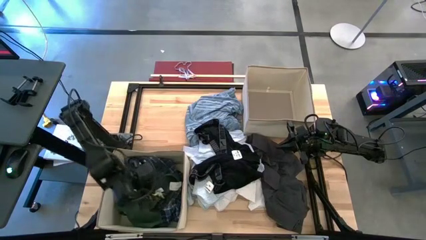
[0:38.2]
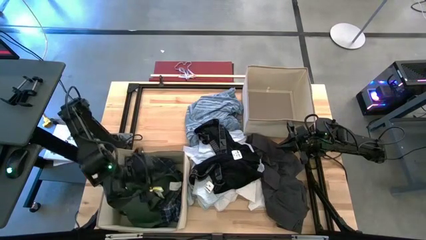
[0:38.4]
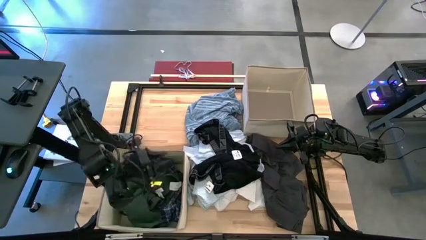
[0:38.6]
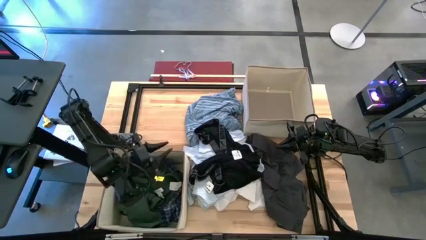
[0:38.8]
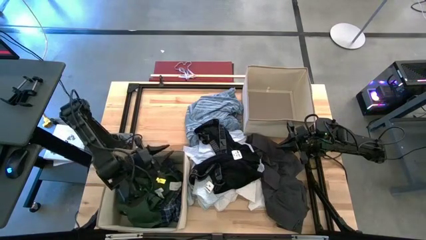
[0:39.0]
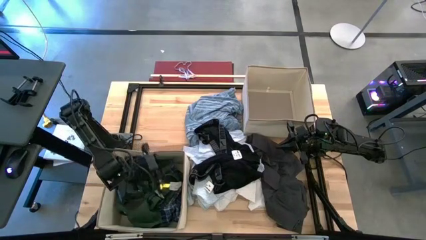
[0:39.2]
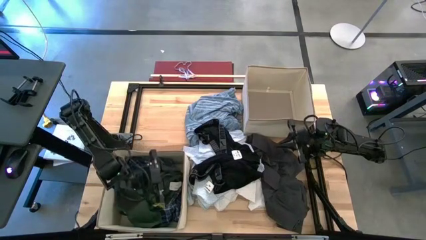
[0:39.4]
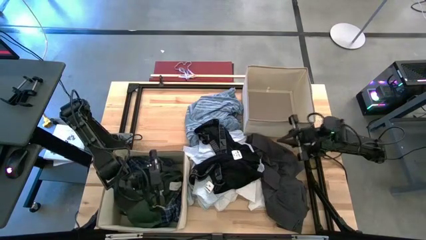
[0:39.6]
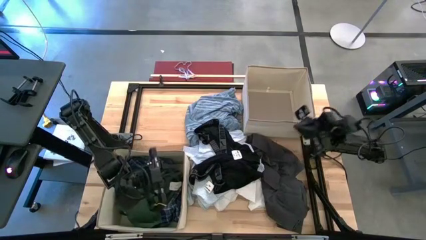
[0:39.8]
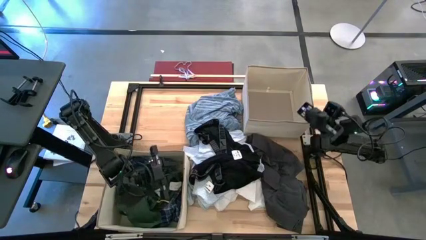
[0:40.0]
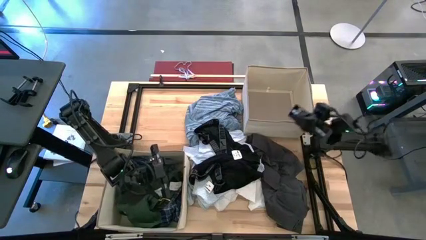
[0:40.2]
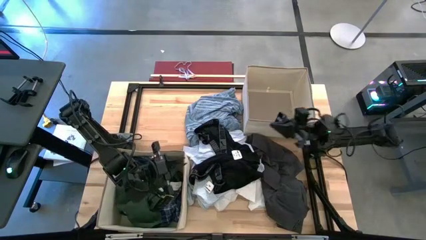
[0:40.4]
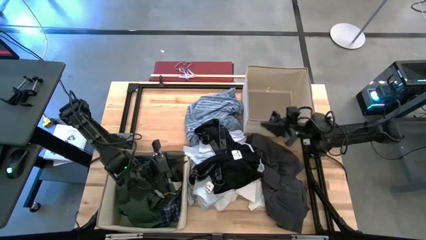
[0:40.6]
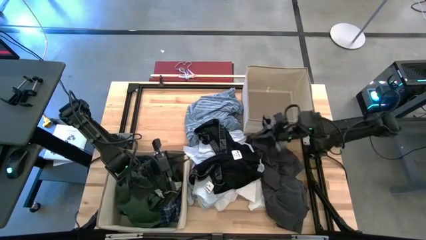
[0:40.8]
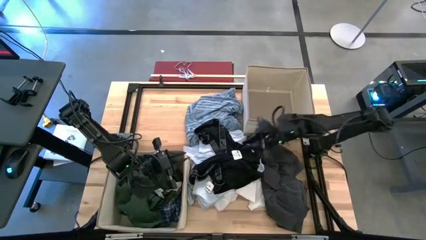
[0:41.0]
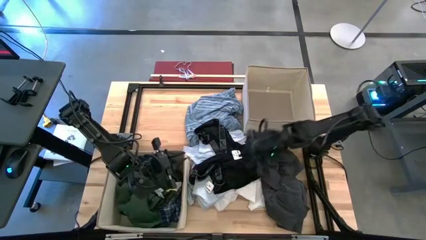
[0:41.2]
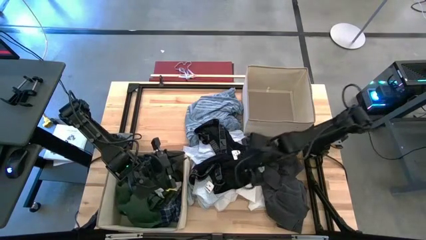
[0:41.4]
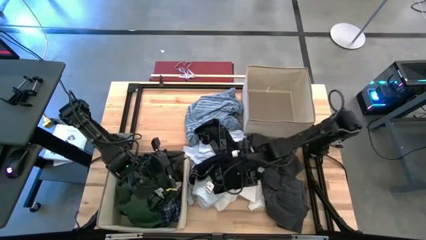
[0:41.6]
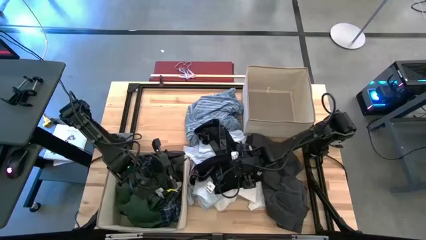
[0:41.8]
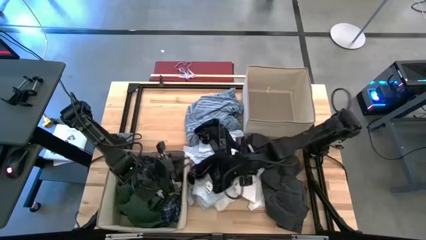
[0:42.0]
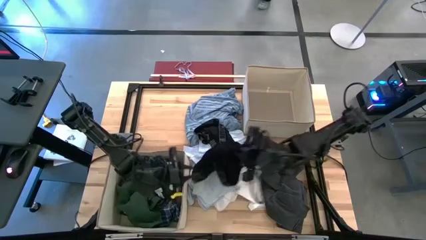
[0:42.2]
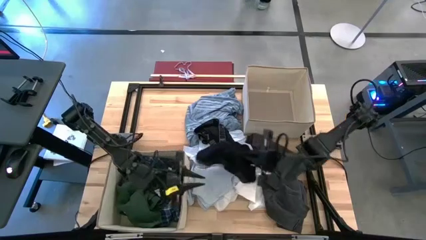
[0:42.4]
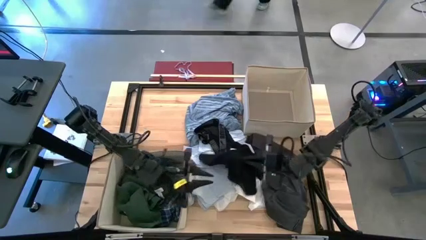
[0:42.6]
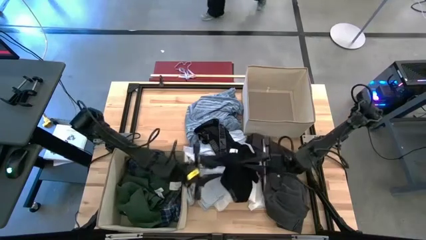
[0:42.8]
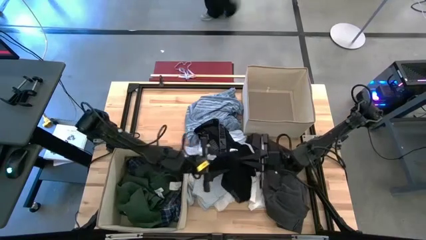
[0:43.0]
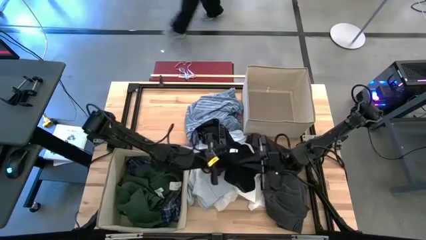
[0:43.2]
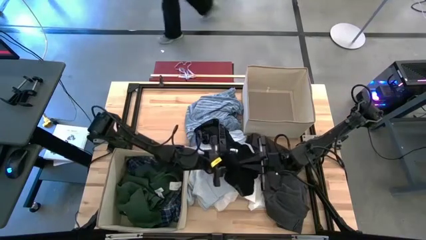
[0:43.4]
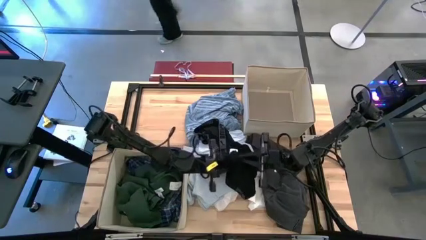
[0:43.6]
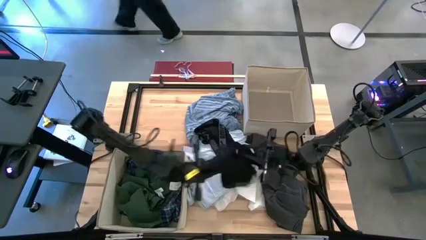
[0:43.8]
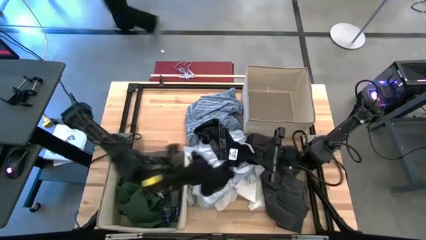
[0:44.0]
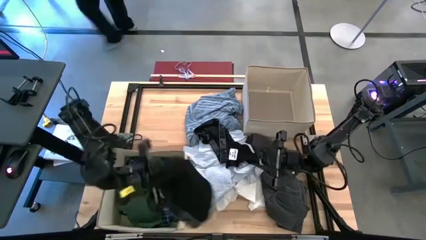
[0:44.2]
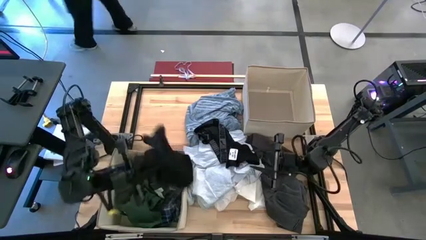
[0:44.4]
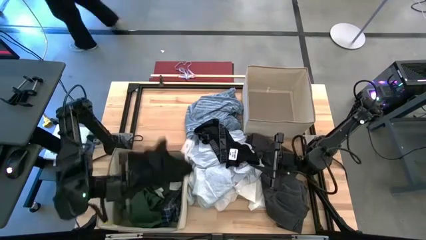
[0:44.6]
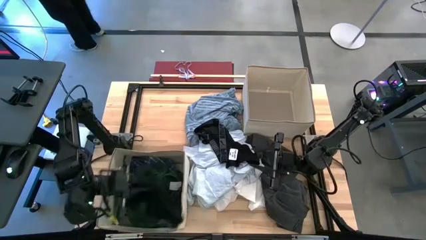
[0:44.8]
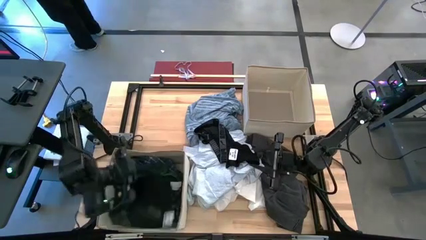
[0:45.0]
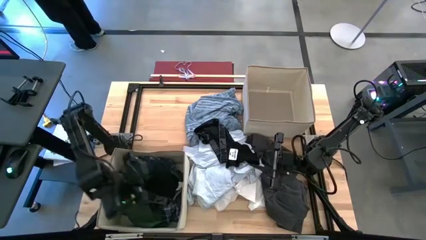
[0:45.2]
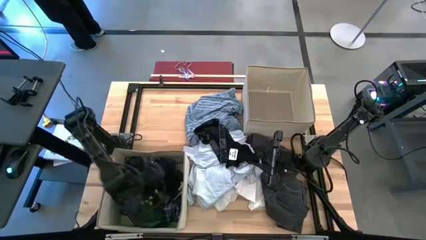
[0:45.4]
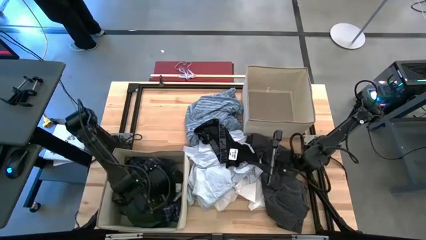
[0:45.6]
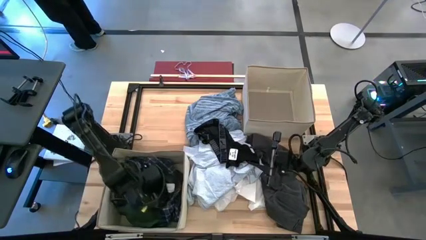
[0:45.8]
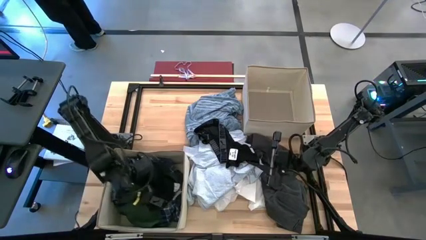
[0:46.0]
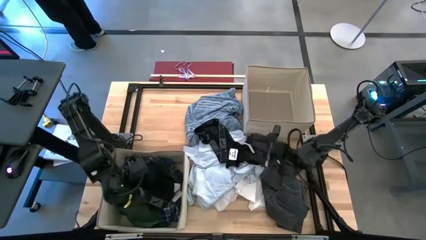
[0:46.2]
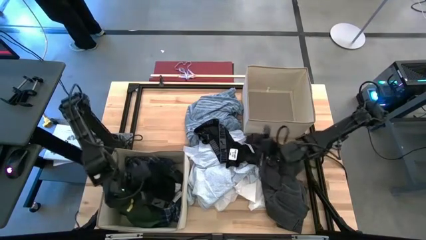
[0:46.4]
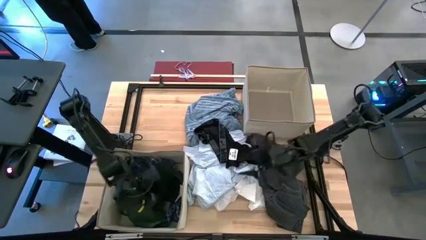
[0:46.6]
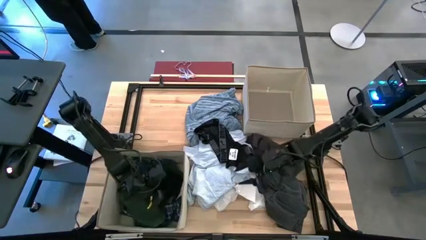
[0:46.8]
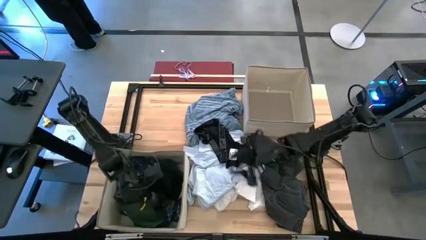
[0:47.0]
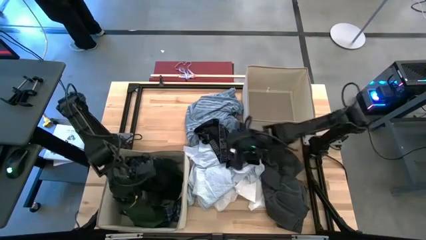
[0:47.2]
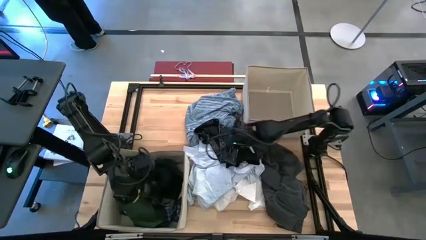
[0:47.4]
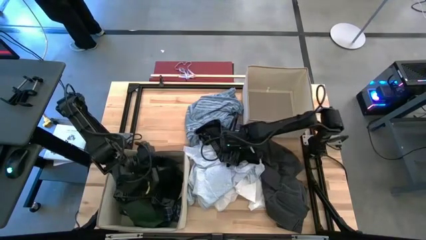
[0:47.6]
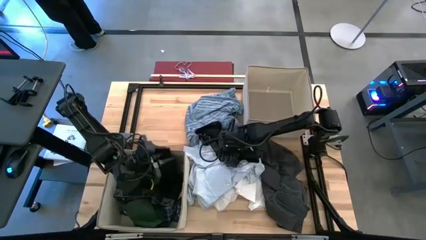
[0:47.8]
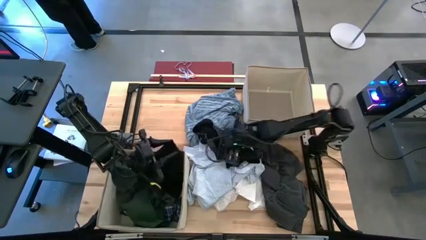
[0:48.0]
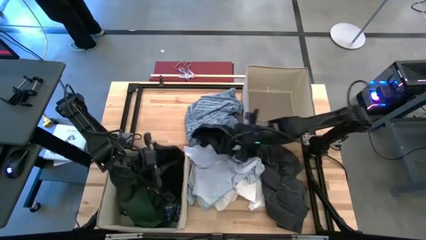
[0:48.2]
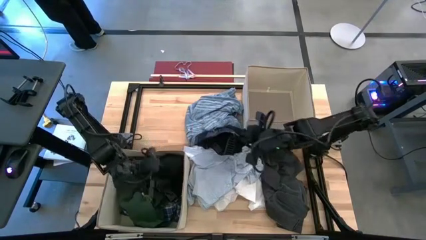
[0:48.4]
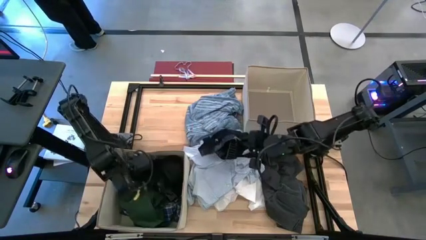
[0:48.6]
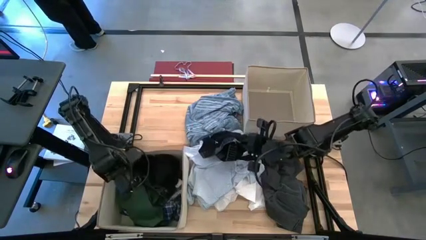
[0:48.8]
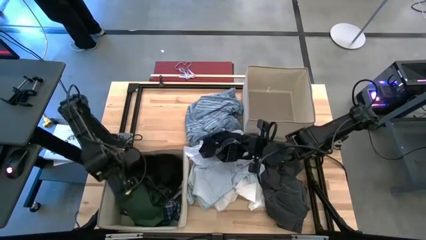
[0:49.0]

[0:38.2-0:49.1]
Task: Sort clothes
Put the bottom black underwear into the bottom brown bin

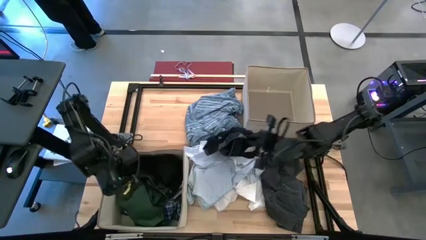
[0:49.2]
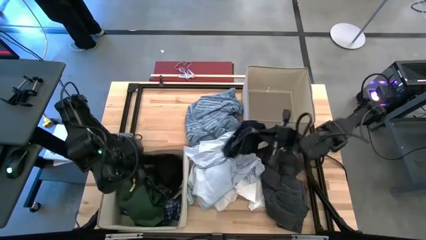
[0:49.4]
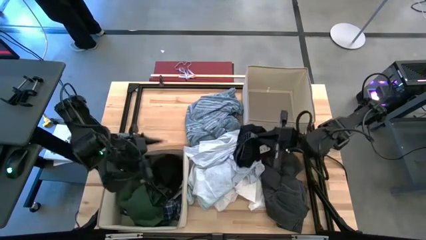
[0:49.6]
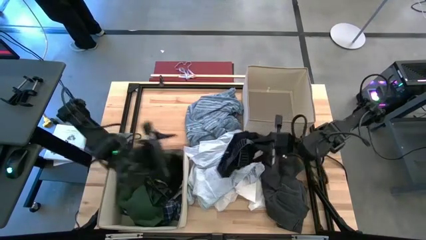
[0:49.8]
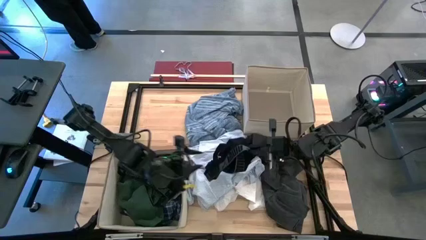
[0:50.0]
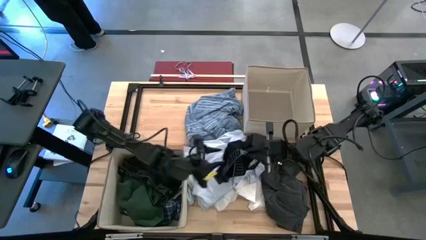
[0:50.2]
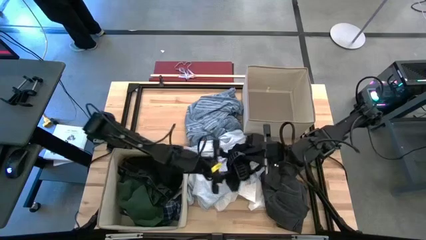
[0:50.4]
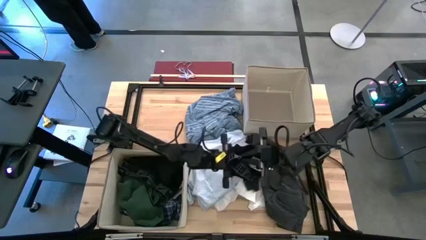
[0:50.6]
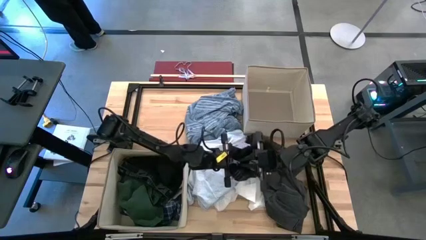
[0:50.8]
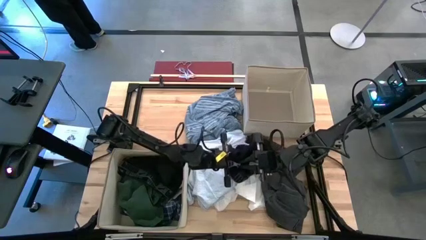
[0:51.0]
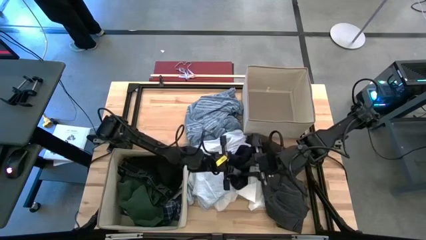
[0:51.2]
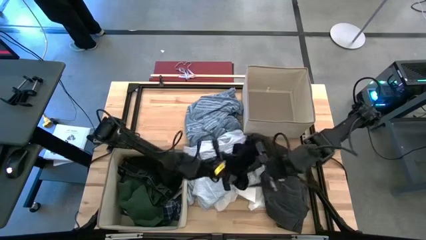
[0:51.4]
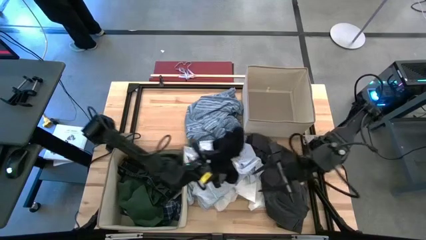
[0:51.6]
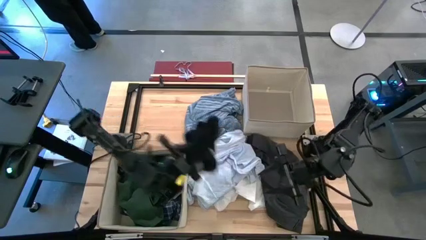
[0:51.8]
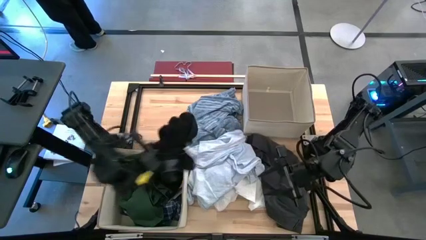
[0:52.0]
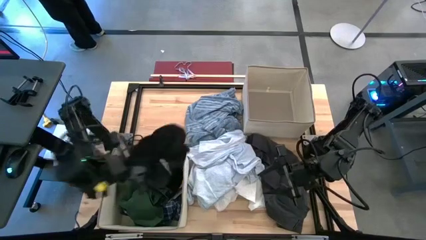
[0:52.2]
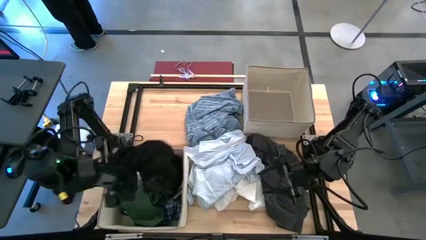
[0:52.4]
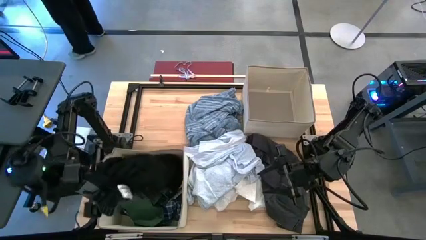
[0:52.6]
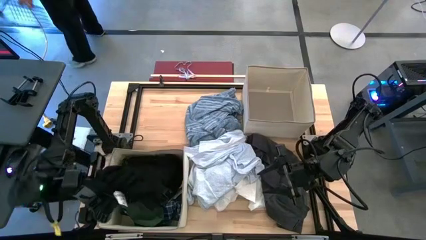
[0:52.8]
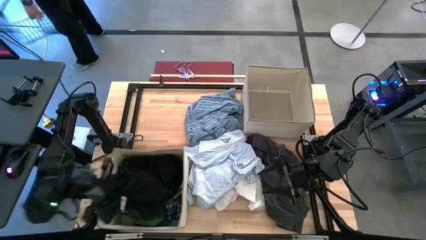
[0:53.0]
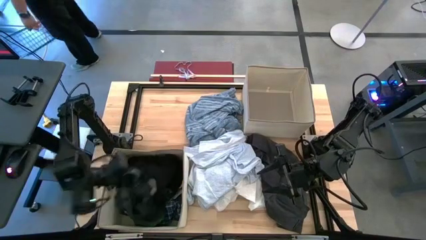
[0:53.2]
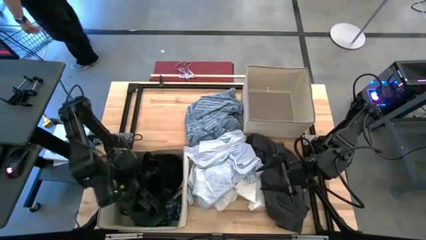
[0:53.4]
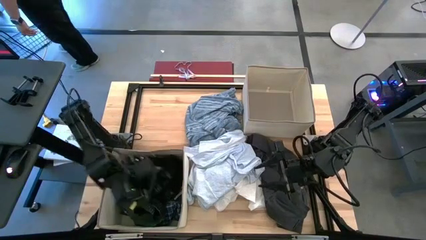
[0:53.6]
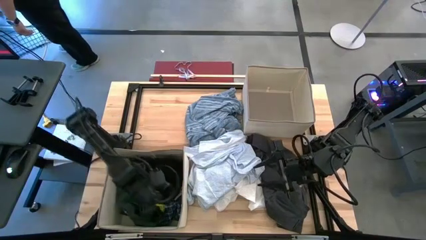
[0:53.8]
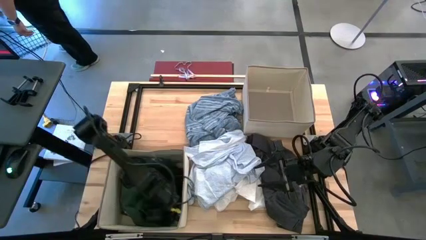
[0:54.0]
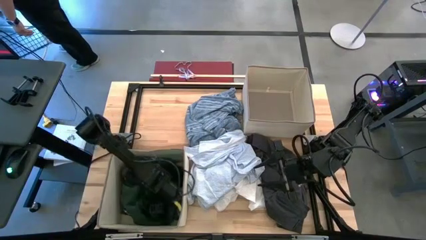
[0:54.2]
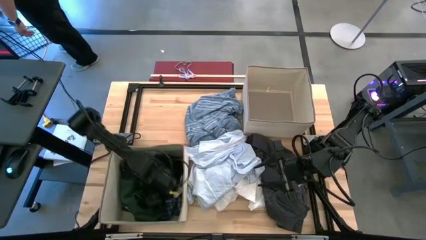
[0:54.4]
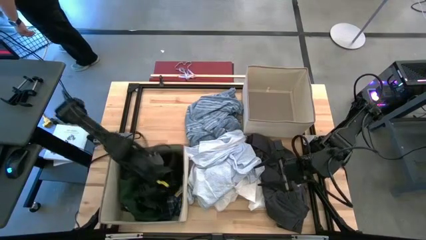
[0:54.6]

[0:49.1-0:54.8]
Put the black underwear into the bottom laundry organizer
